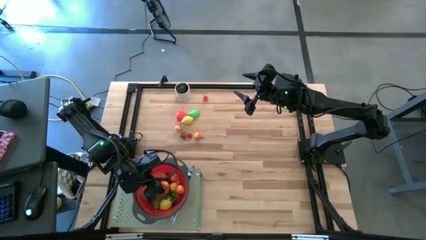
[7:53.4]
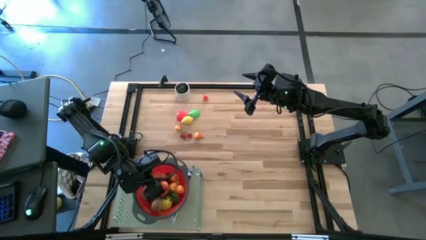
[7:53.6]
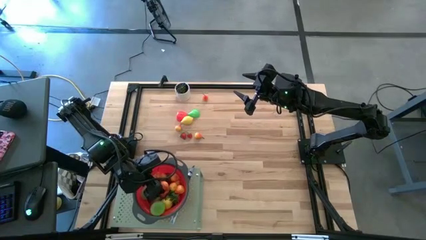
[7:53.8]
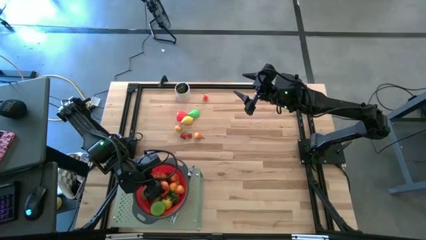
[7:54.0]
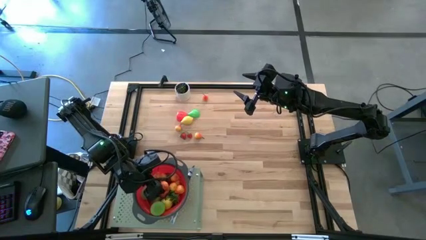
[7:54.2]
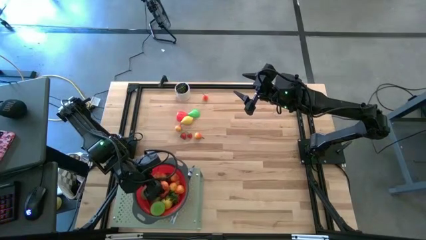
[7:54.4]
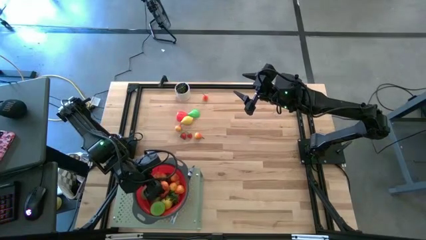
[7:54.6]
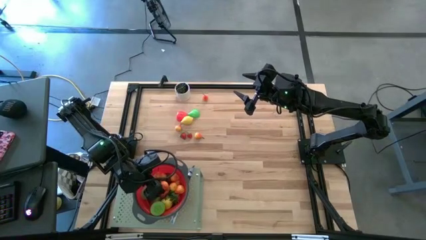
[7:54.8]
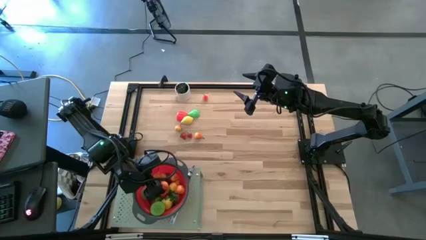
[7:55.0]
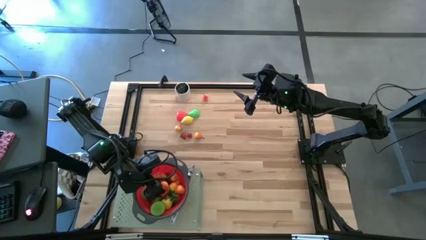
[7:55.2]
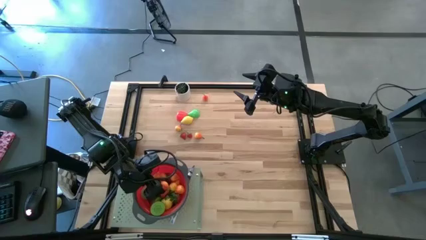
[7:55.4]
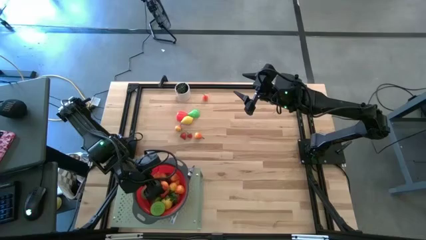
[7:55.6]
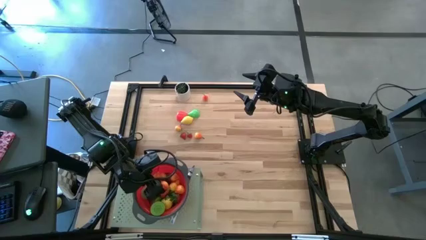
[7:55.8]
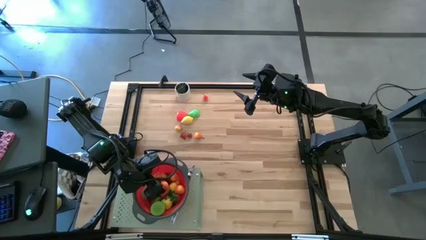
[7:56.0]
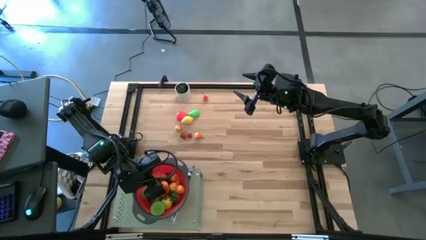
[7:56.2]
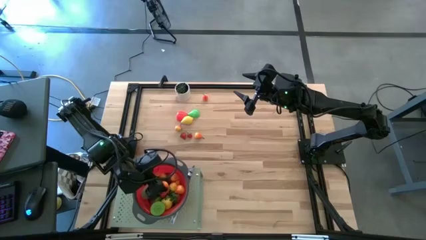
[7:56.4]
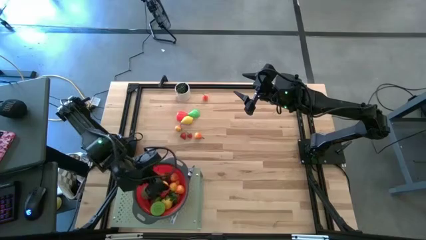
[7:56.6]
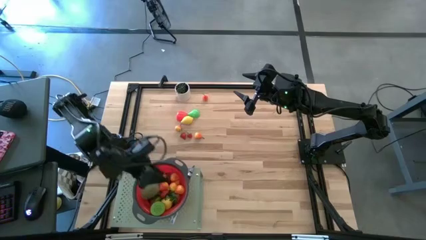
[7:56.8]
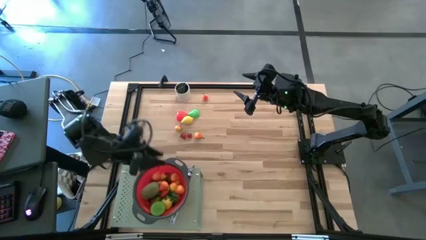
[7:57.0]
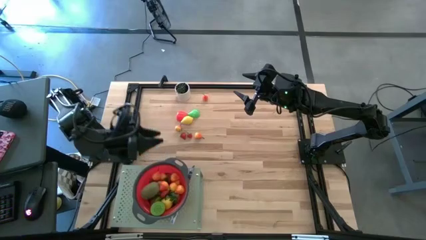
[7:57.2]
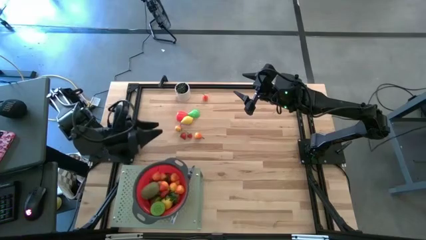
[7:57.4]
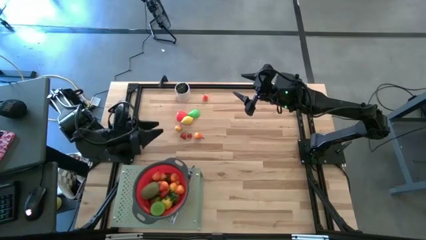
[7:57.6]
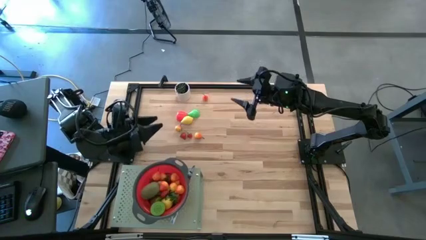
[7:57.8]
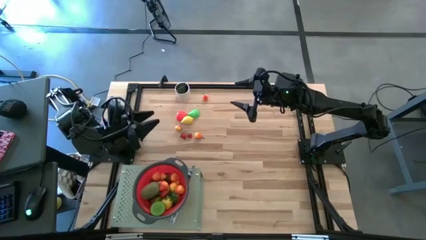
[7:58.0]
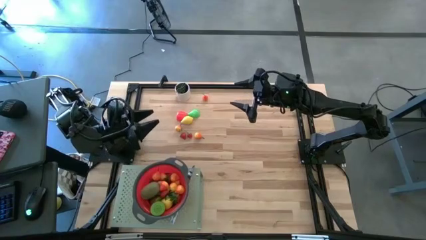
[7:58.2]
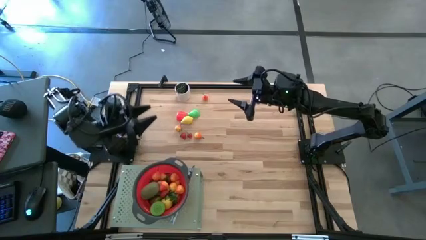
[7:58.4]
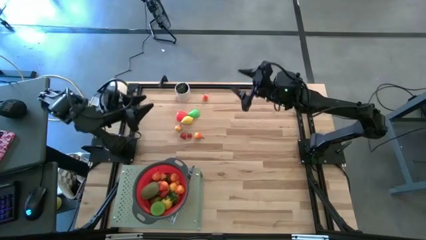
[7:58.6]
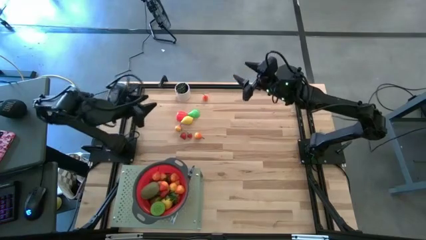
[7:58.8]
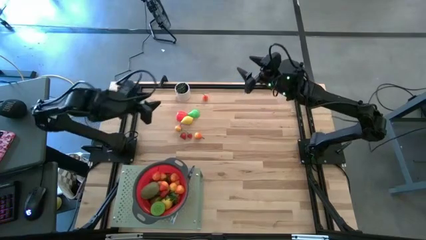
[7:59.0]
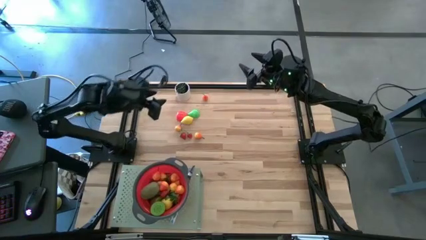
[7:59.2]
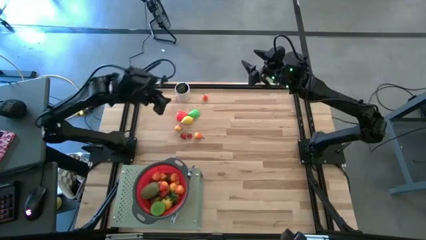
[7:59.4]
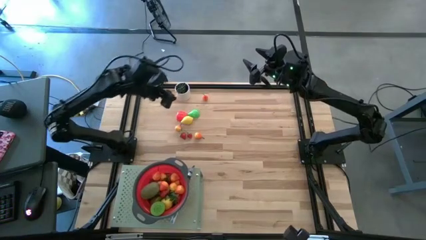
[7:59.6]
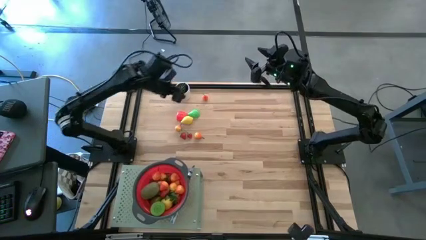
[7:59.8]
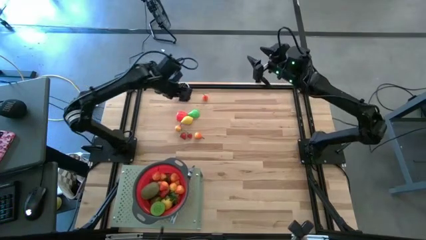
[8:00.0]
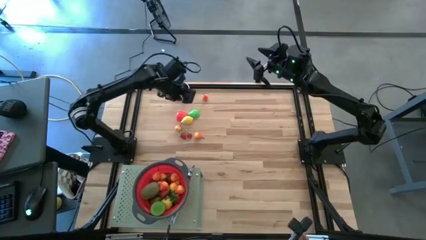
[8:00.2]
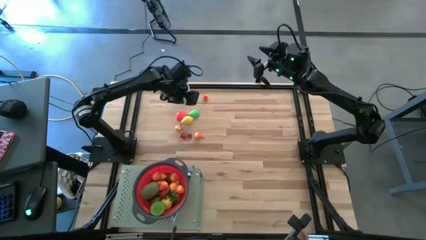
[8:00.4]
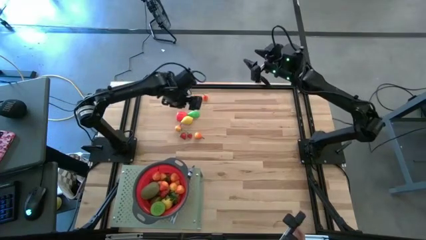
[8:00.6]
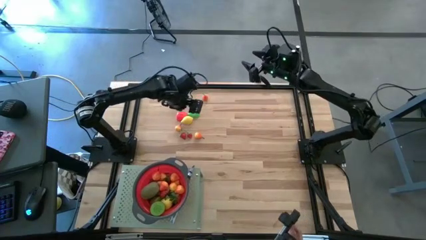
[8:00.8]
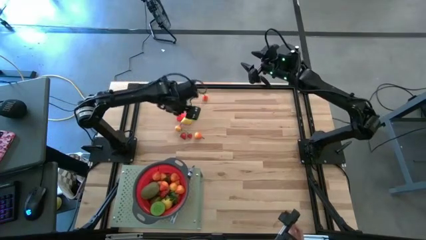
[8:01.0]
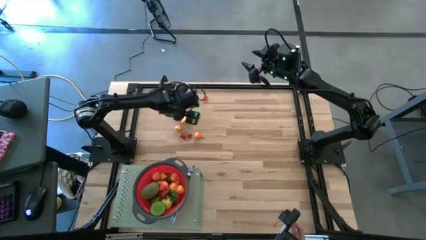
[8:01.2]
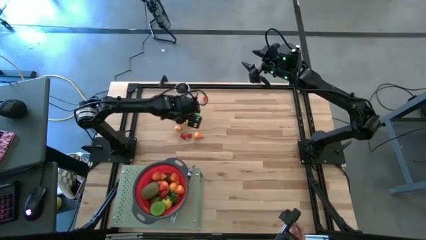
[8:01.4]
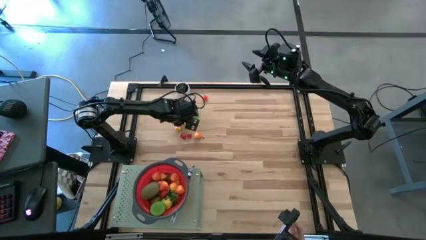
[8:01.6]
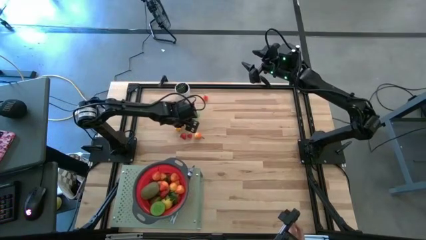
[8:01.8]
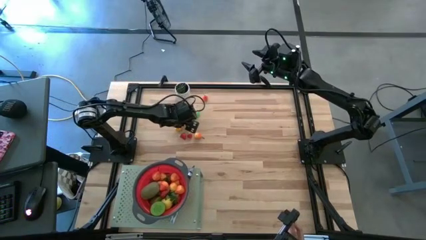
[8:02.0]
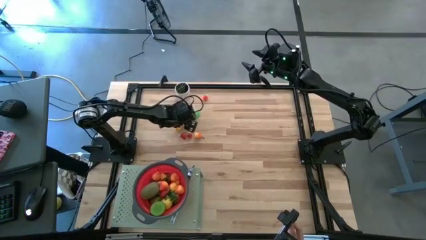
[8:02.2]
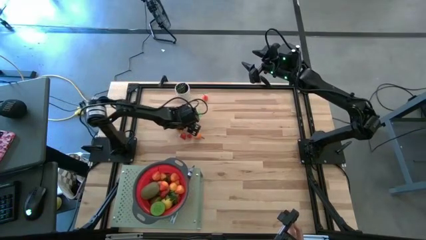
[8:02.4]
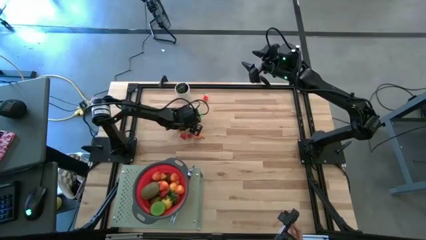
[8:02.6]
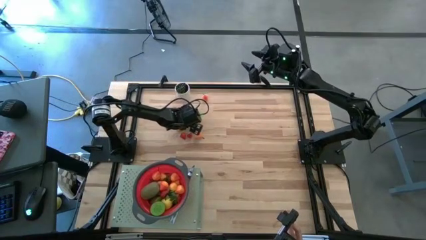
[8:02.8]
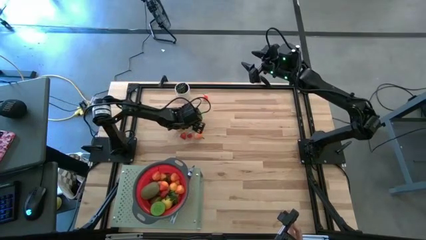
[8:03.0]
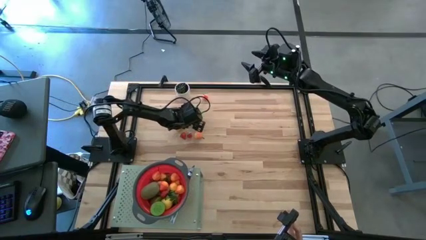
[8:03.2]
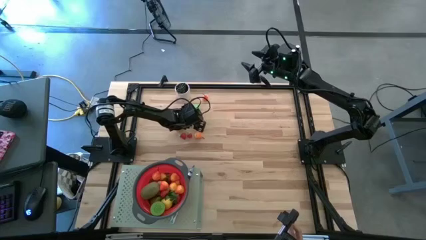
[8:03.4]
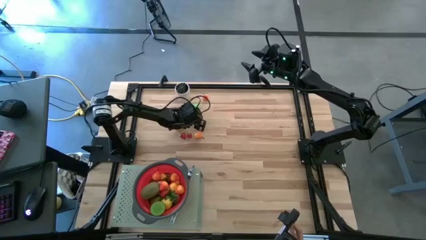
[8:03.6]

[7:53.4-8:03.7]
Task: Pick & Place Fruit
Put the lemon into the red strainer bowl on the shelf

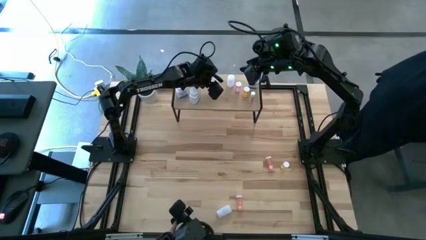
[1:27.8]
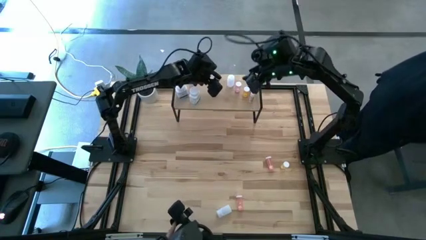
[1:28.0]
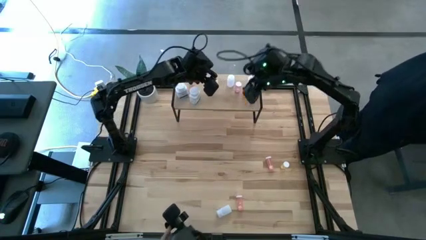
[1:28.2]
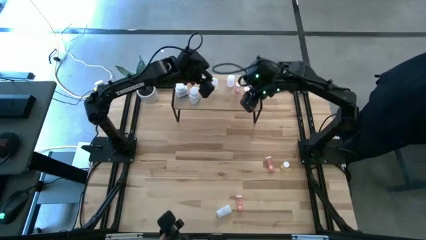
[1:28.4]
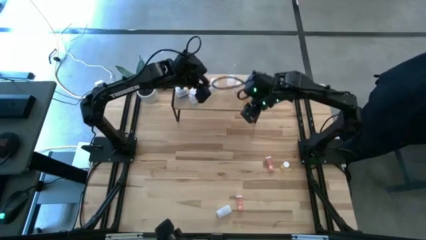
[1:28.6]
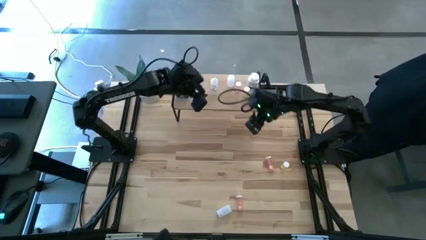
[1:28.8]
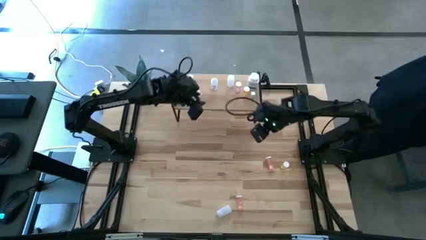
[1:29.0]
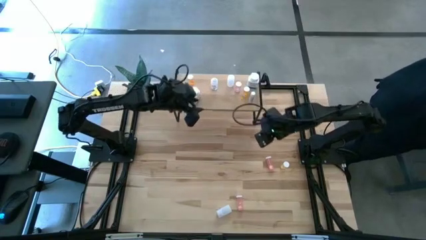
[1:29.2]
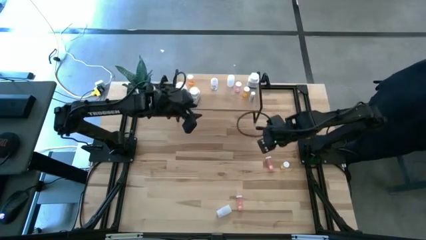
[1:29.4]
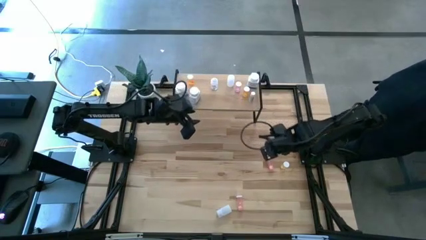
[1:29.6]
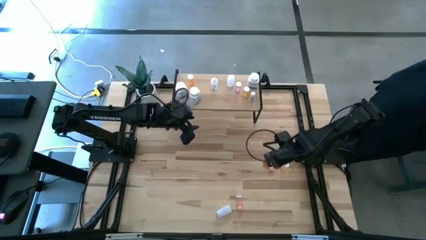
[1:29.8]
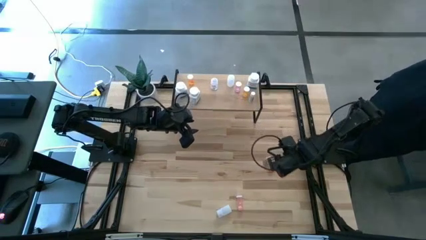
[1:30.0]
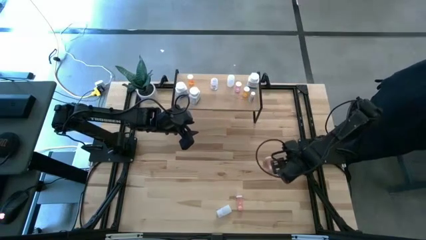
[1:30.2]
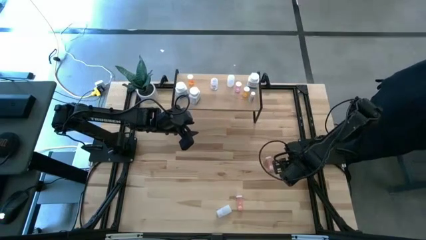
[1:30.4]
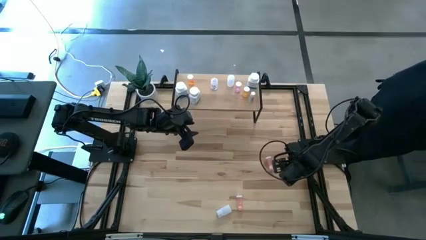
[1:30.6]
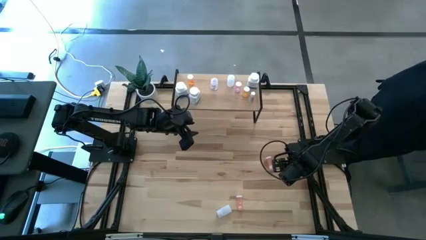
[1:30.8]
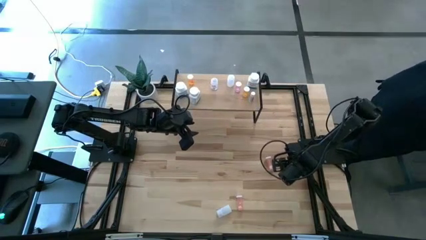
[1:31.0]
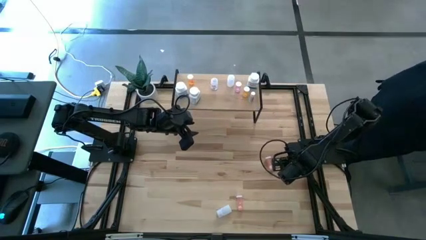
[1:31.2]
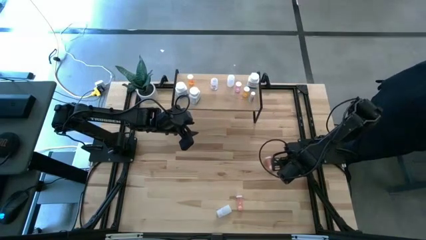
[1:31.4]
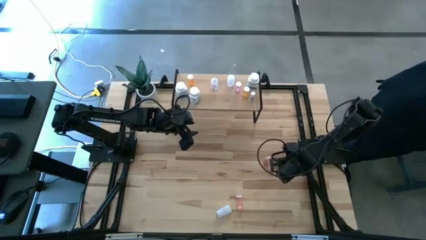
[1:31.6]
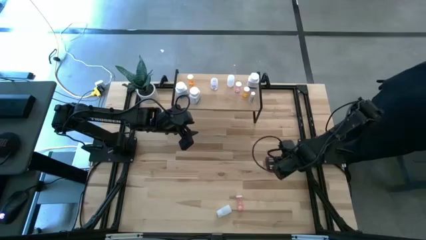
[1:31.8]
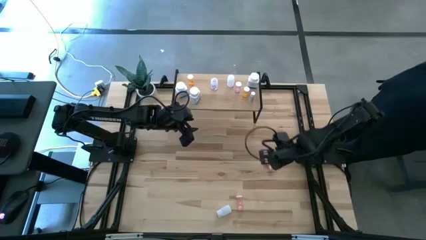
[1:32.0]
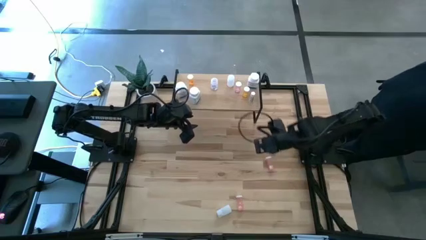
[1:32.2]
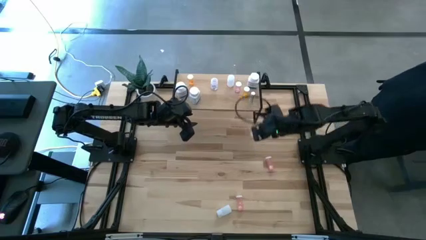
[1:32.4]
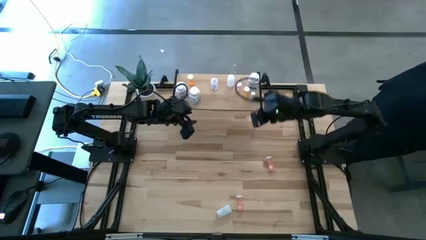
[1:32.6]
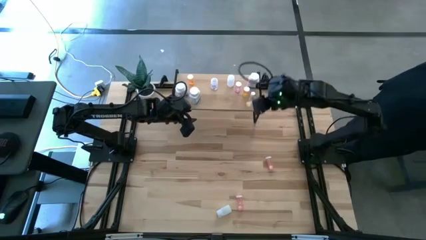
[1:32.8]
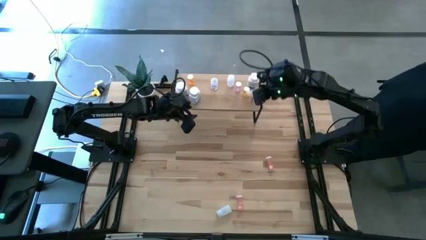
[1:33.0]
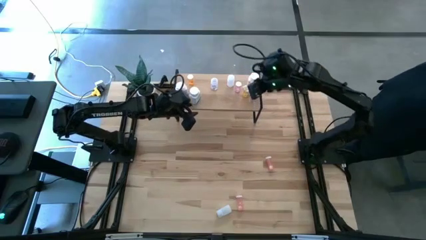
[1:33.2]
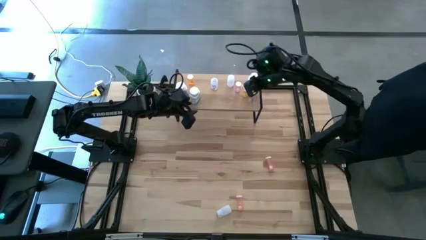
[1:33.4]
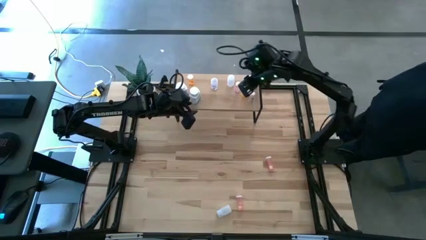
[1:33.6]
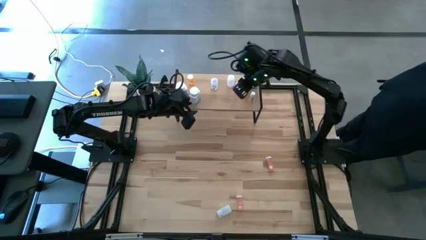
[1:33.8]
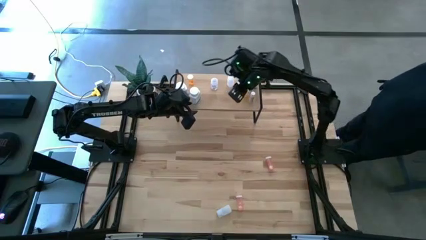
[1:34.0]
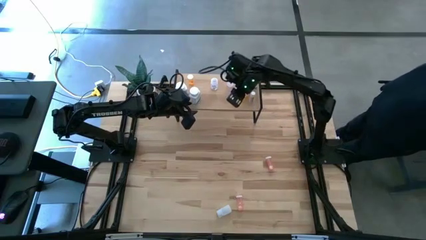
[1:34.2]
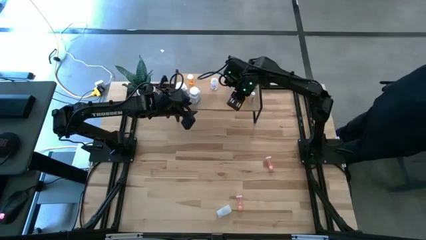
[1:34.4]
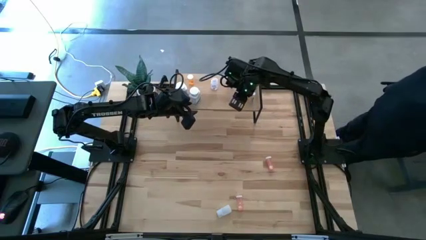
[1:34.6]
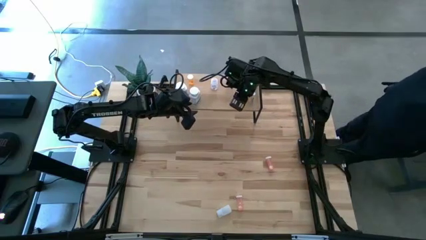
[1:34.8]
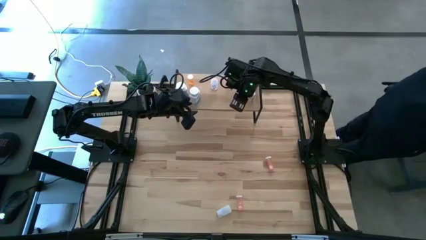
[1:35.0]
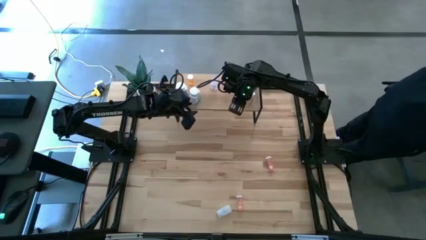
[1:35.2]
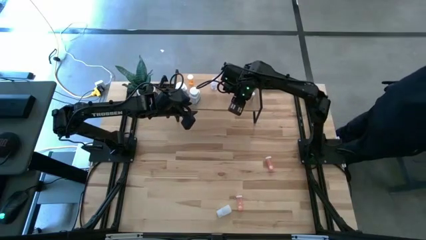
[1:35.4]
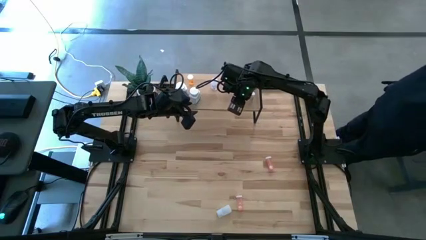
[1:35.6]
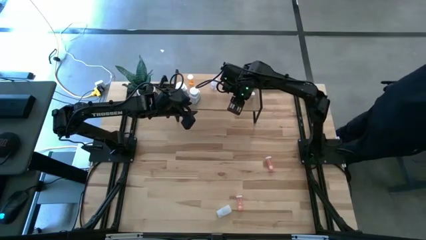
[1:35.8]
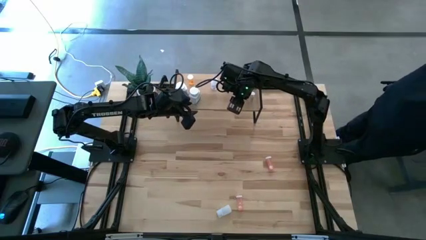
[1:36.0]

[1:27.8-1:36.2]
Task: Pick and place medicine bottles onto shelf by color
Put the yellow pill bottle on the shelf
